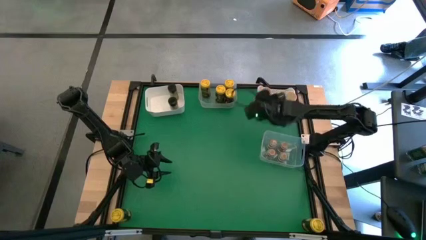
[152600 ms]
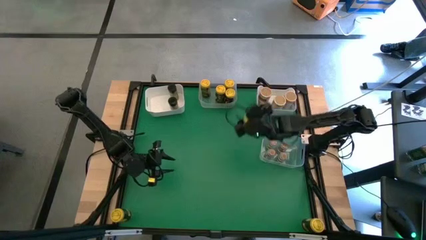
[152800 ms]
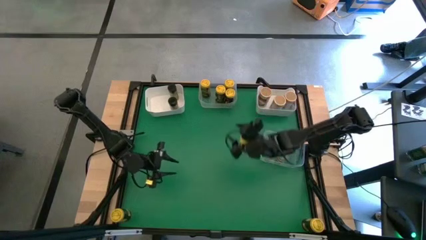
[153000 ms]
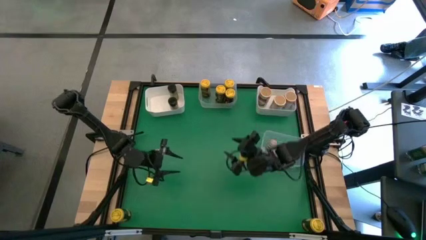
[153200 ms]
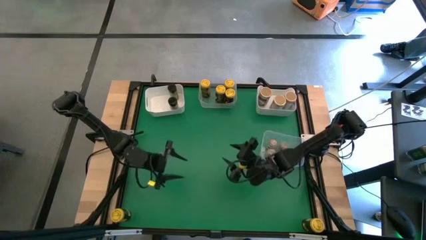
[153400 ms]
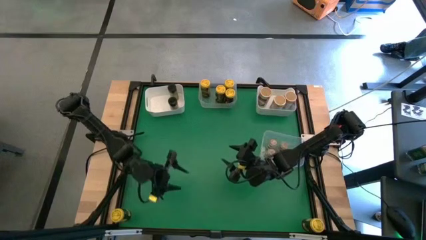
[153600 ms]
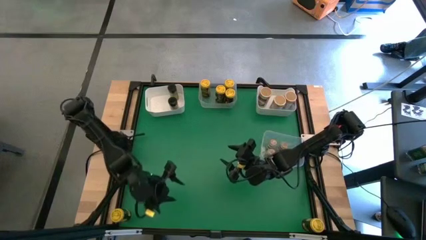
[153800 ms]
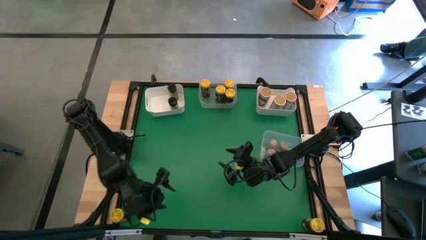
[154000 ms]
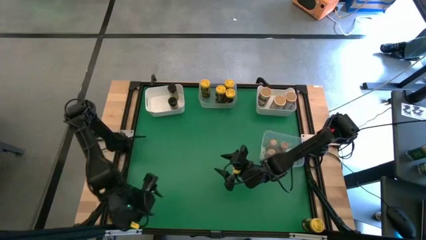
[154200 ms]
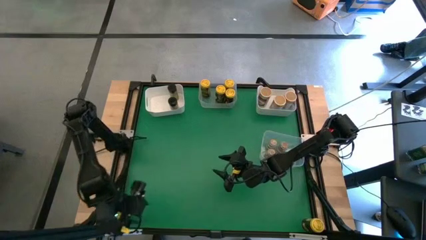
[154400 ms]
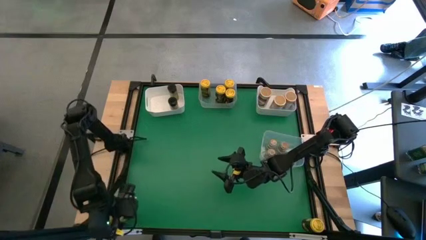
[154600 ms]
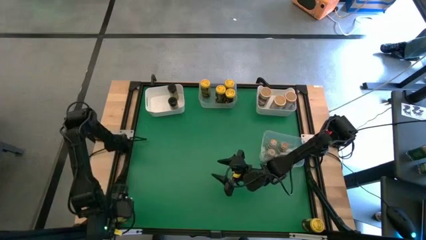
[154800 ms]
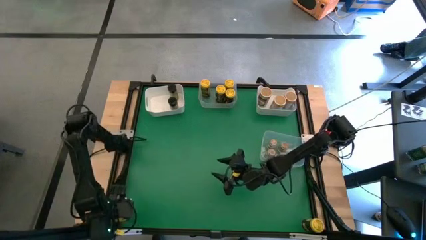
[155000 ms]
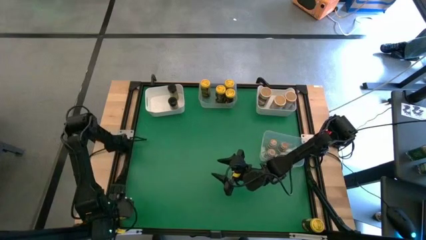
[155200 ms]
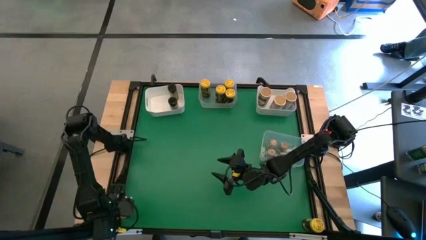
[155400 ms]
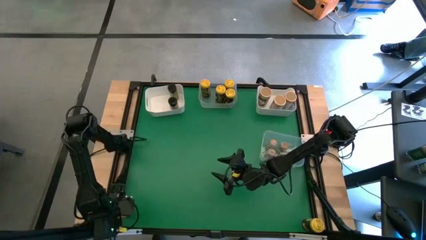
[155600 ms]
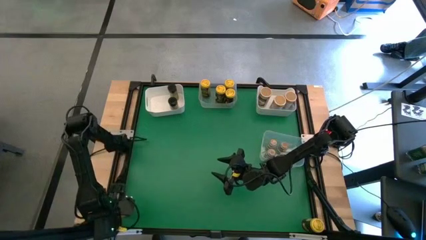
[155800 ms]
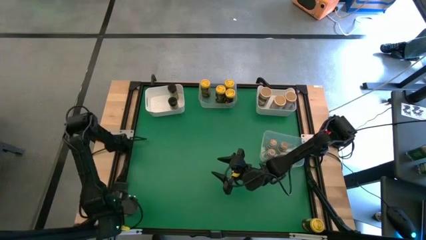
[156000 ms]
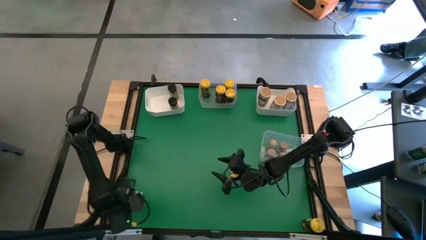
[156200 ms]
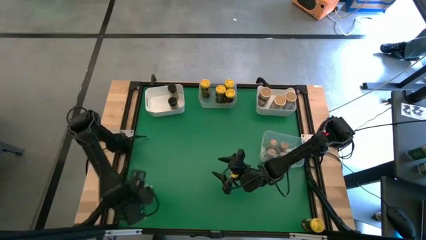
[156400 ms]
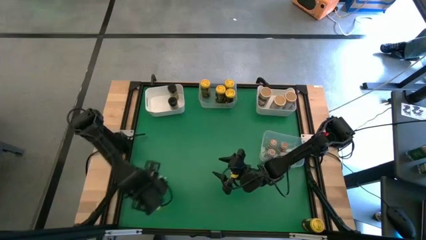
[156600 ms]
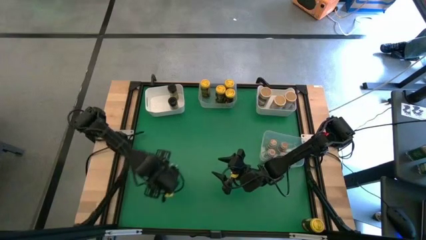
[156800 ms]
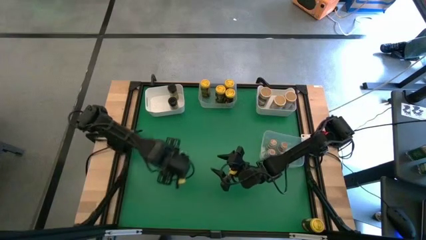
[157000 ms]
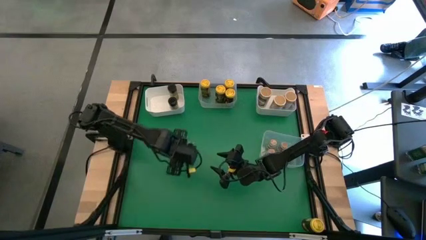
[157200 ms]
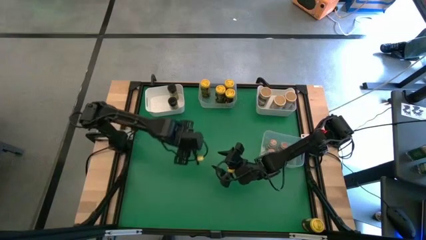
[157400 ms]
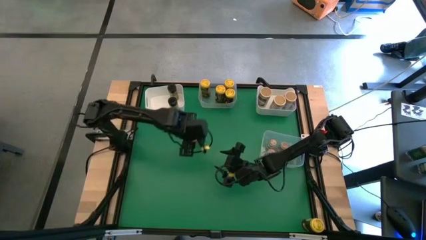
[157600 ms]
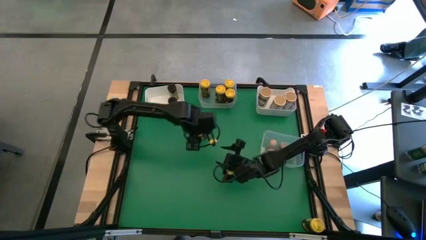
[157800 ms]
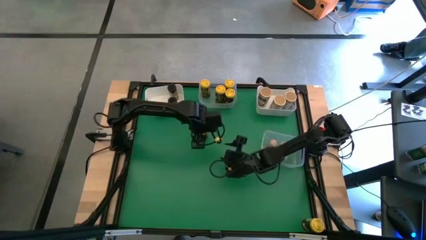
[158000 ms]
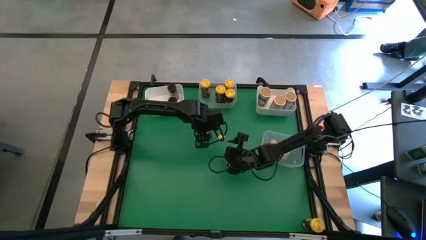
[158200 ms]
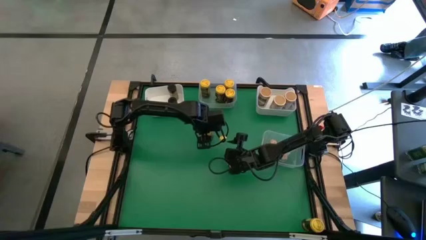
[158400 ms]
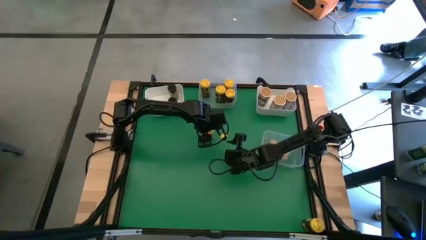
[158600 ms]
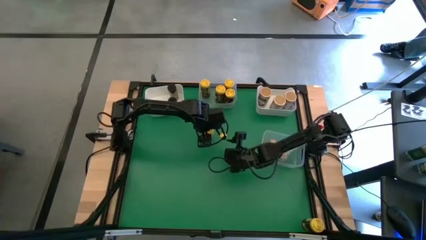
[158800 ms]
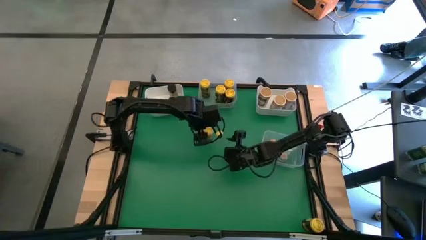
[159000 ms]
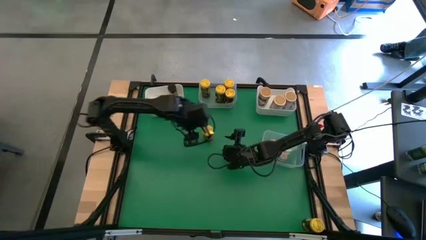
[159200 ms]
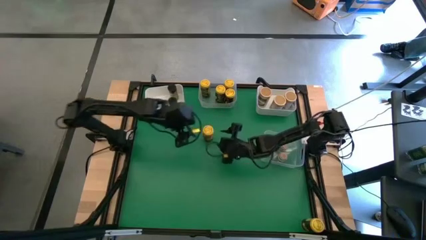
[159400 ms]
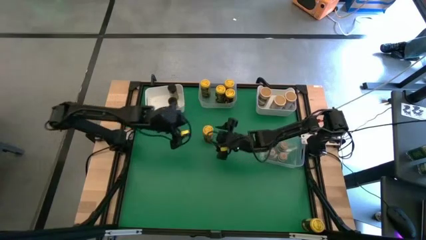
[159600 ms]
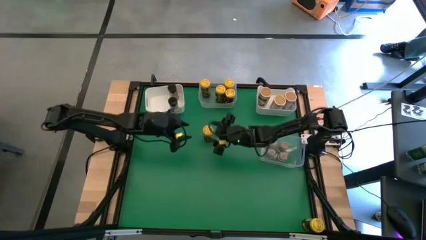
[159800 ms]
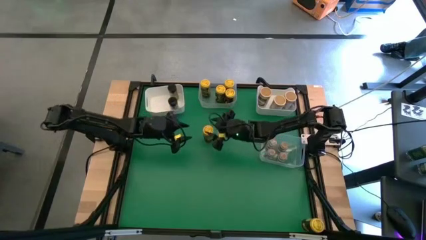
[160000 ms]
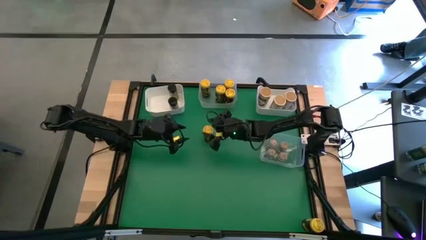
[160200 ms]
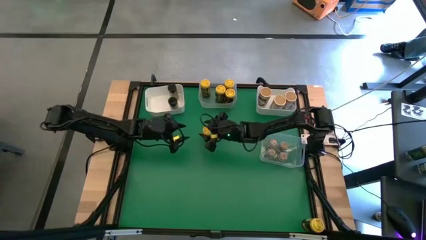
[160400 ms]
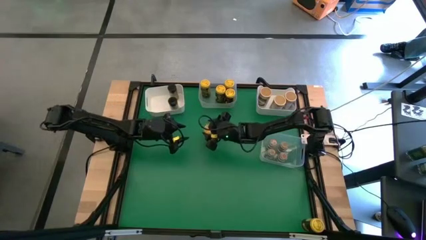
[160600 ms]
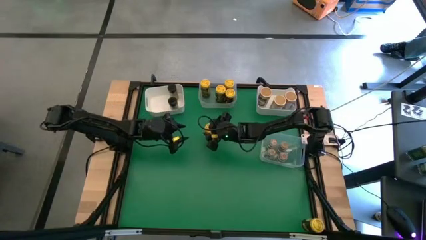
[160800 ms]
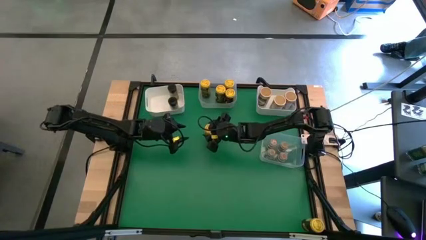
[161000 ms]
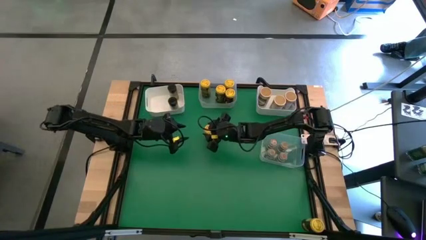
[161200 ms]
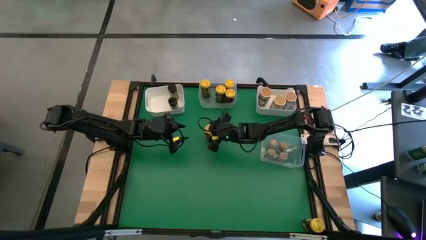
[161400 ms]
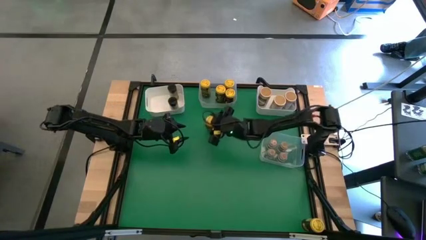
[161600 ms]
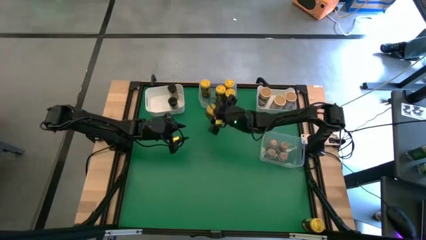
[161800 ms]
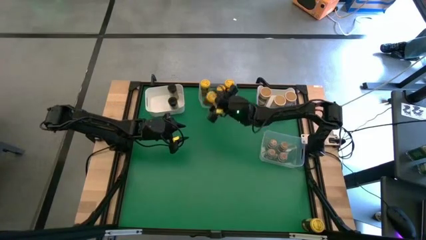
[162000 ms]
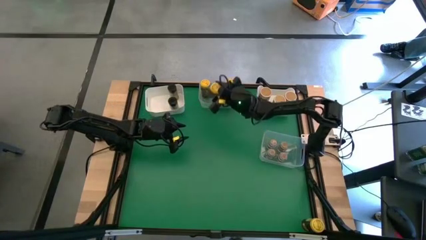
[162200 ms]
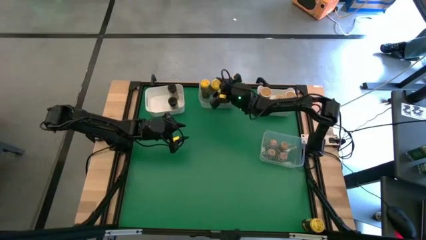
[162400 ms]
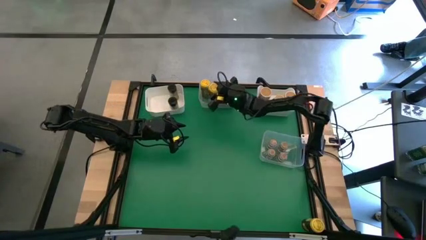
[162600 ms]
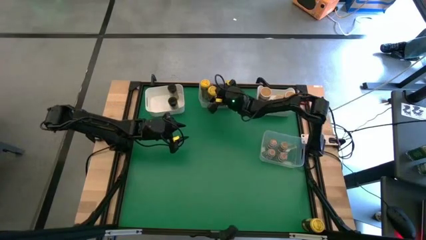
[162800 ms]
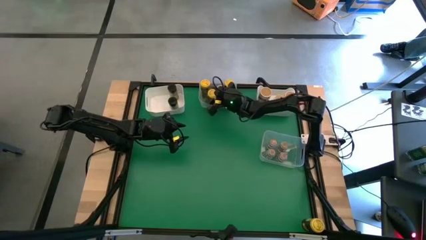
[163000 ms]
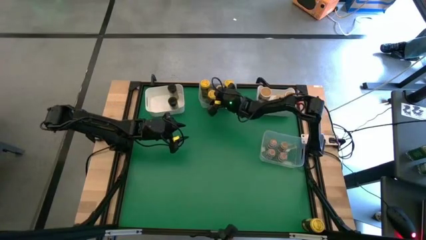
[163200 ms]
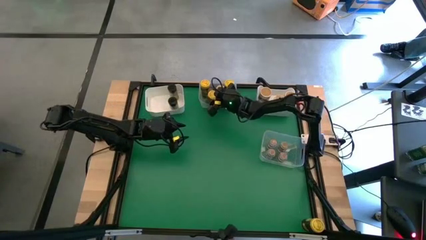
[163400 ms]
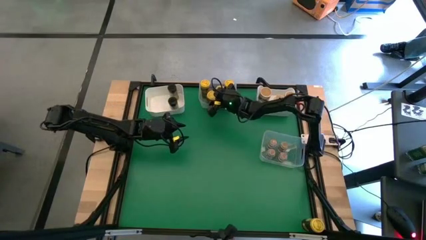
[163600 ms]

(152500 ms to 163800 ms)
Task: Sort spices by type
Put the yellow seasoning bottle into the top transparent bin
